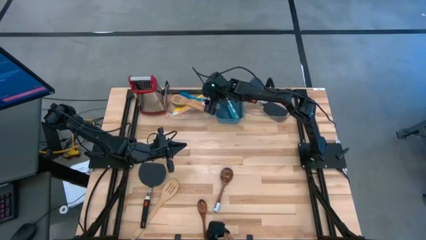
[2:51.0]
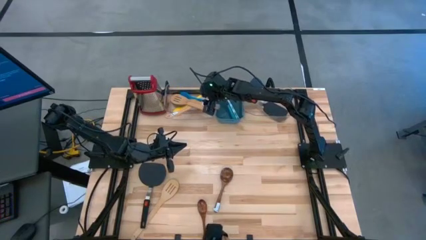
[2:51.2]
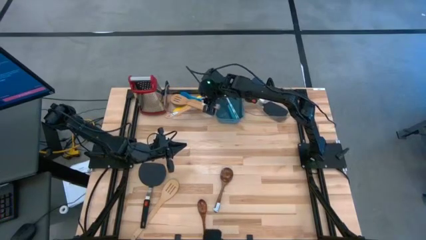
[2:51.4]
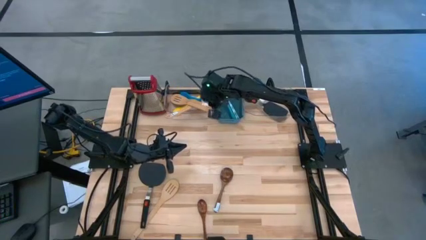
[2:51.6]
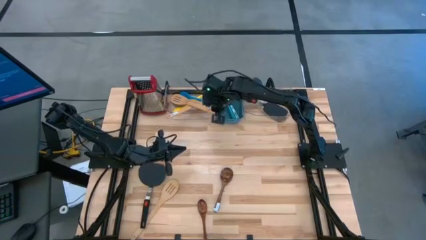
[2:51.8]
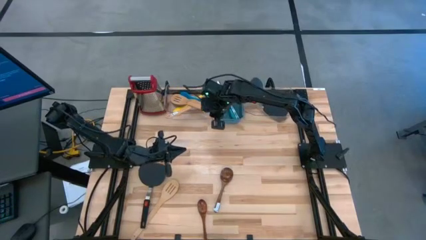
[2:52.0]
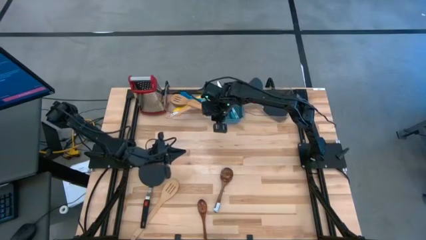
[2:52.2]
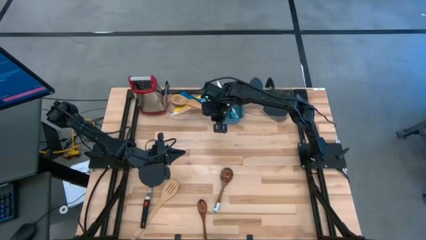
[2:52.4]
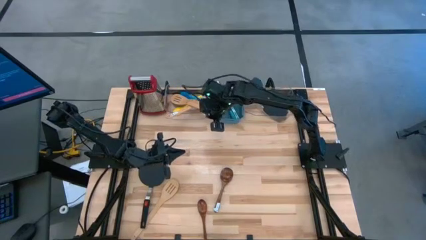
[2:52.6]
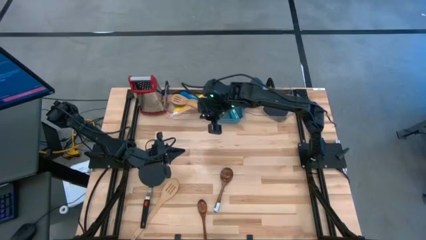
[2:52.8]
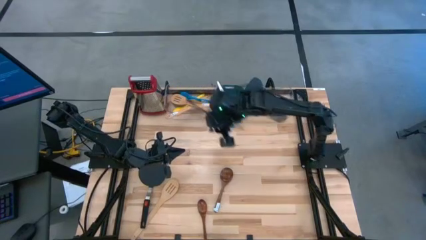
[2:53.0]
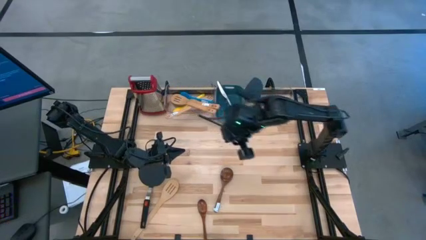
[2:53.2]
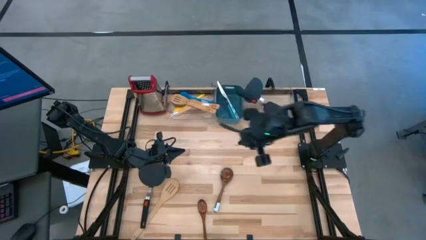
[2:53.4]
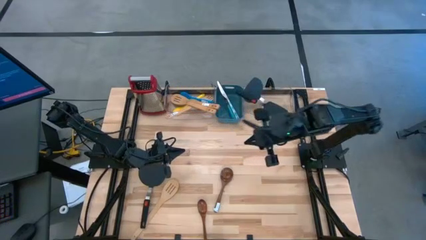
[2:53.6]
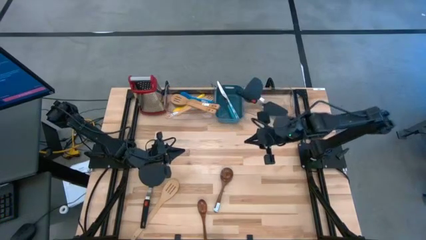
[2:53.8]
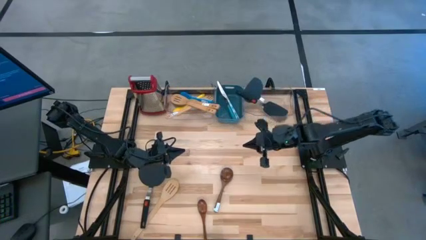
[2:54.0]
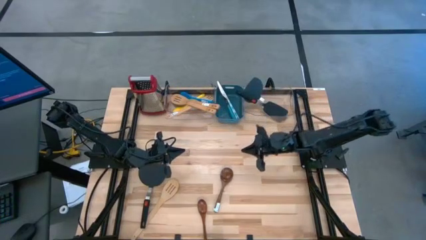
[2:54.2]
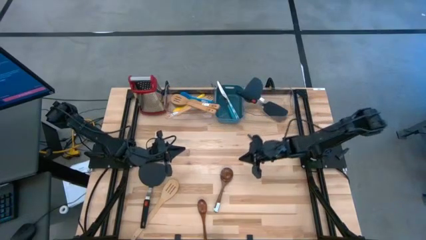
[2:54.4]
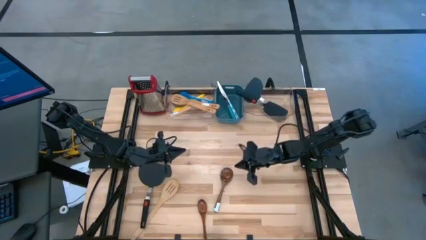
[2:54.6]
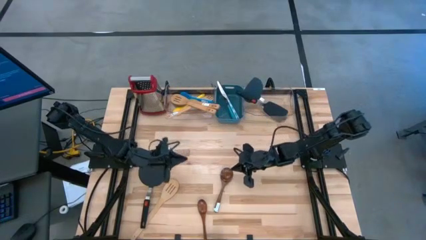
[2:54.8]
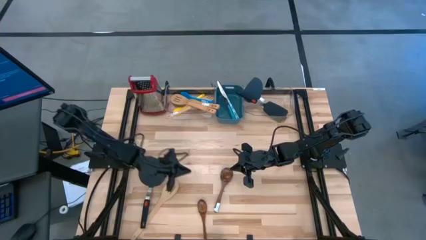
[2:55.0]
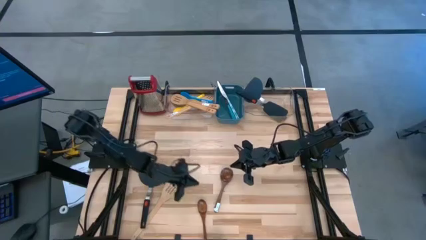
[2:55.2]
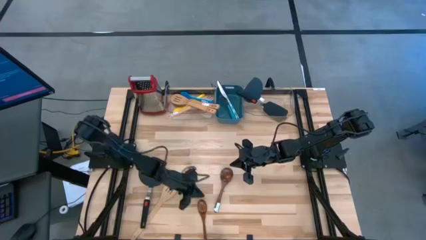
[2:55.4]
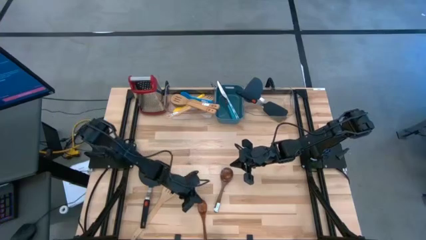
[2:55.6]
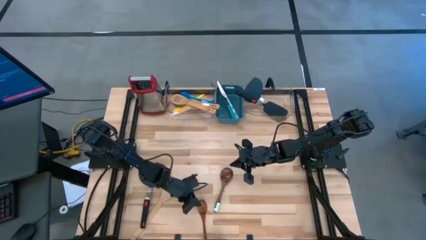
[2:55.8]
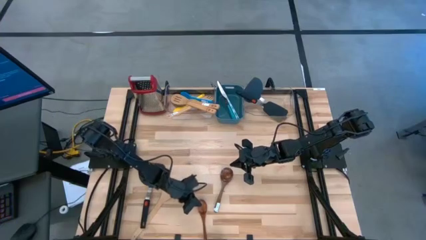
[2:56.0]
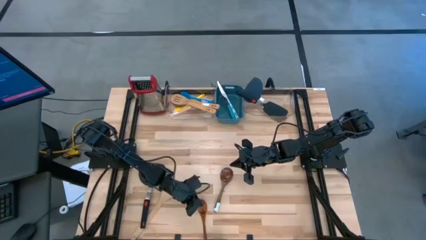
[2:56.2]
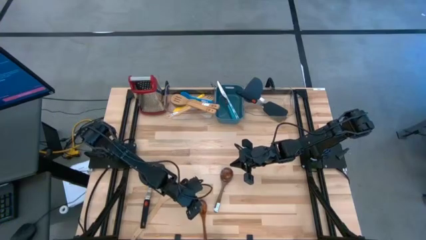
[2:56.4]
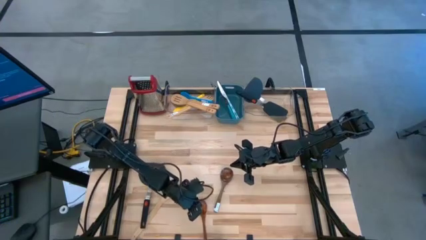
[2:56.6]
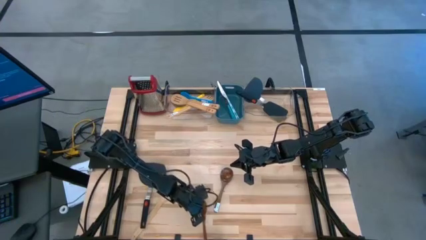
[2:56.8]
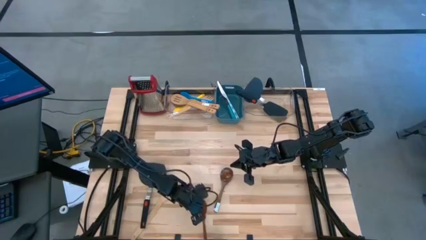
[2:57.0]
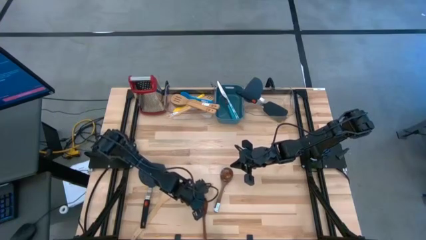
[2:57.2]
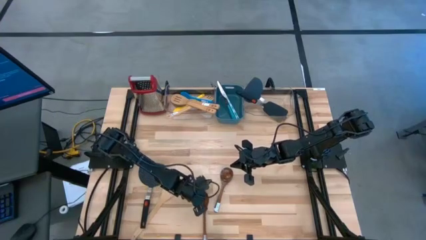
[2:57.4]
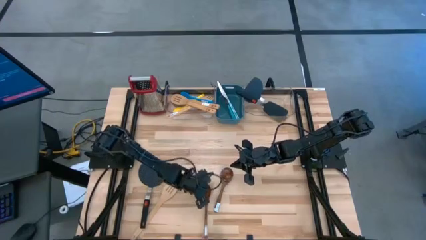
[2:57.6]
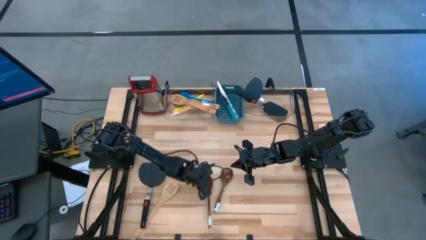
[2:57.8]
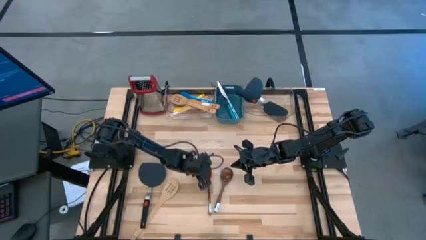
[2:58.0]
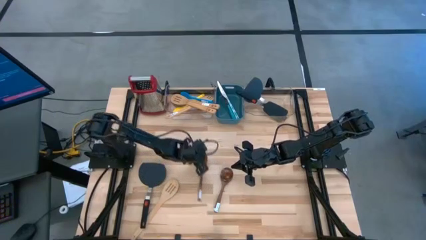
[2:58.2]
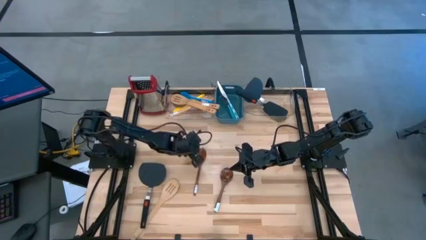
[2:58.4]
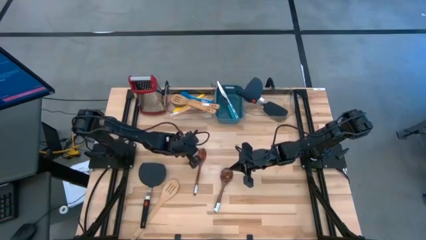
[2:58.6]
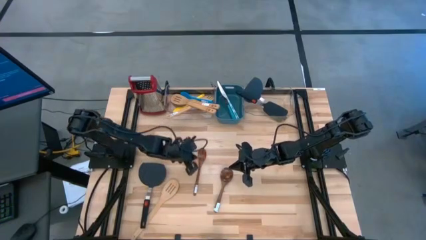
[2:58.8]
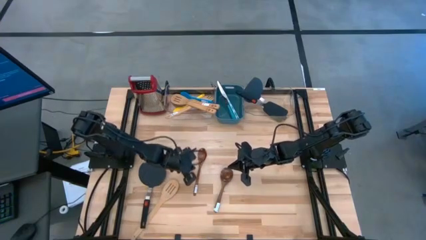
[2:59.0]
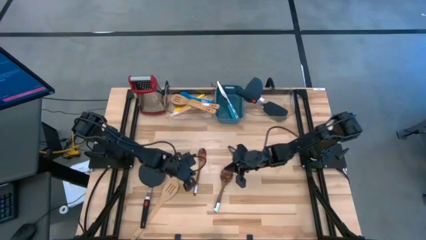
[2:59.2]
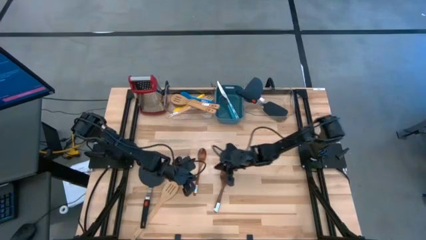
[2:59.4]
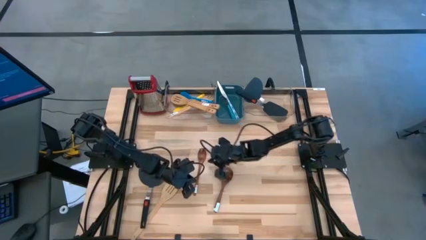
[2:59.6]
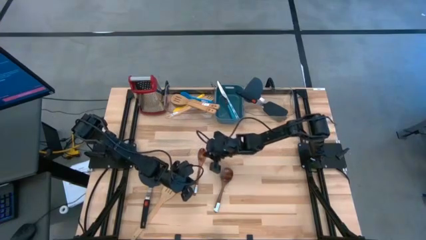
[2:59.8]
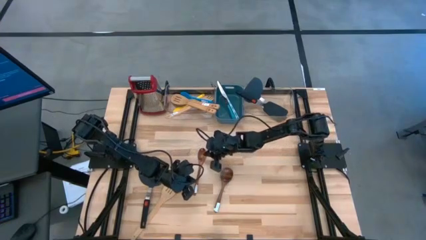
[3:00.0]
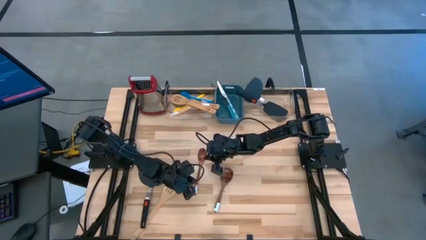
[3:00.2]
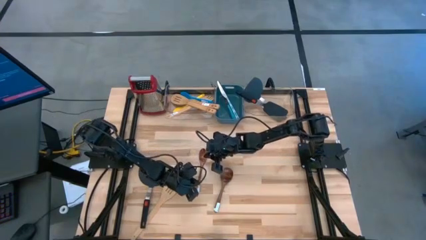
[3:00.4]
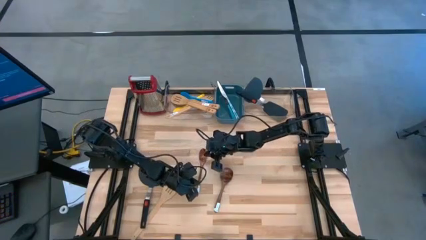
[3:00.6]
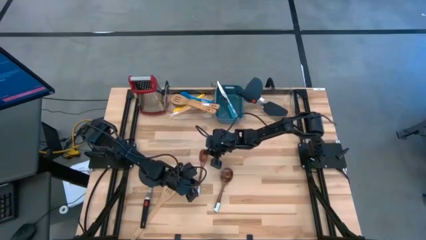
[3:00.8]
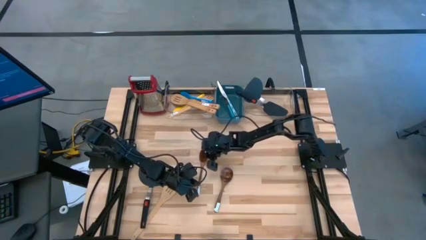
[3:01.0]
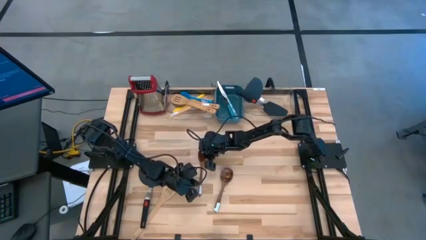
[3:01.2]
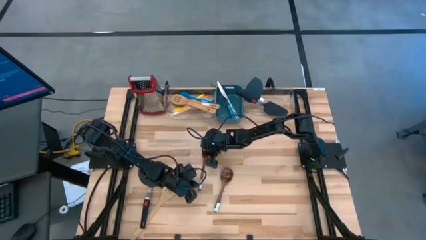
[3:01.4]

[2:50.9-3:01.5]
Task: Pick & Place Kitchen Items
Put the brown serving spoon into the left transparent bin

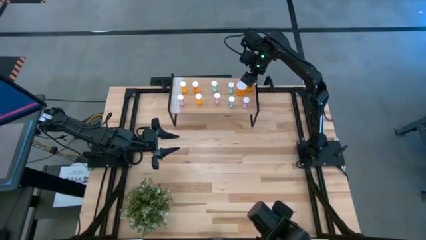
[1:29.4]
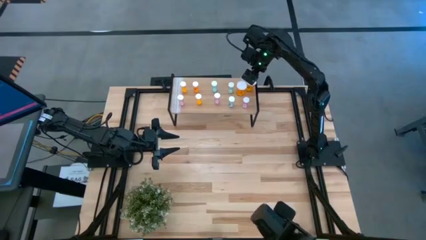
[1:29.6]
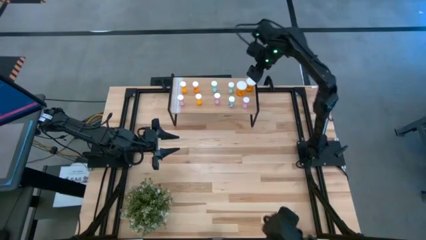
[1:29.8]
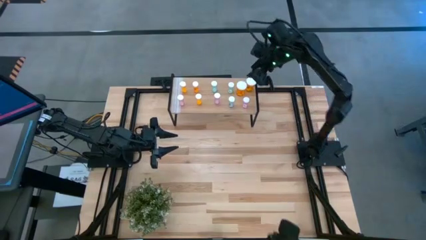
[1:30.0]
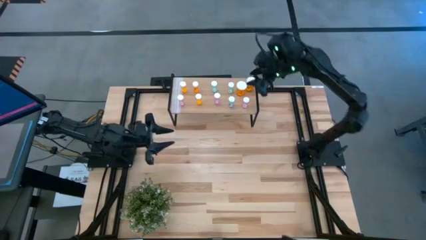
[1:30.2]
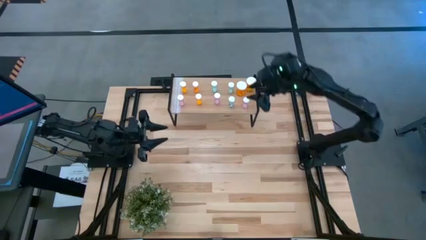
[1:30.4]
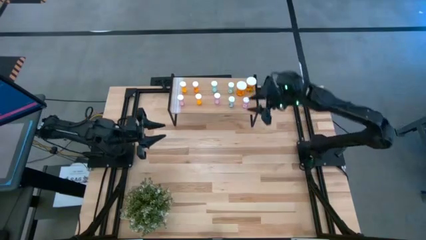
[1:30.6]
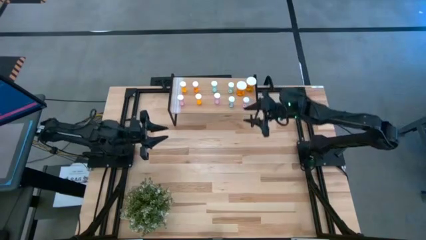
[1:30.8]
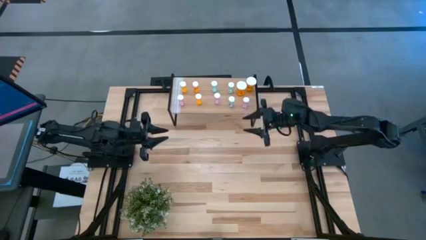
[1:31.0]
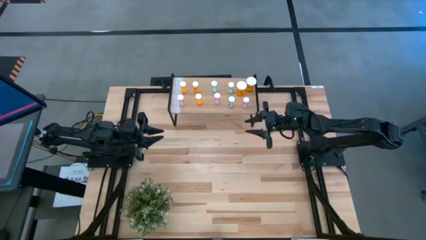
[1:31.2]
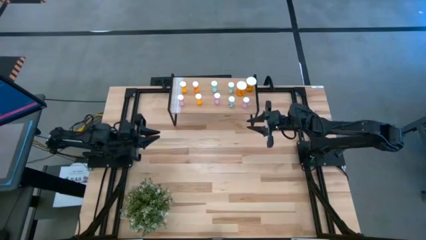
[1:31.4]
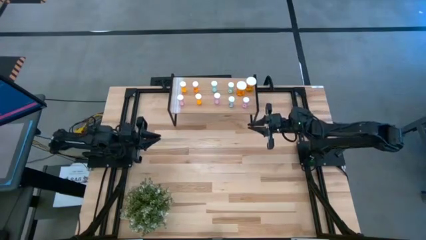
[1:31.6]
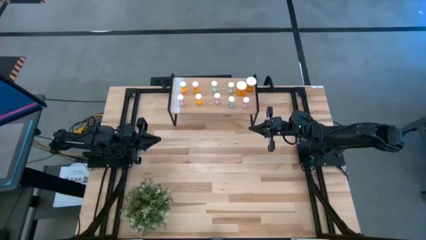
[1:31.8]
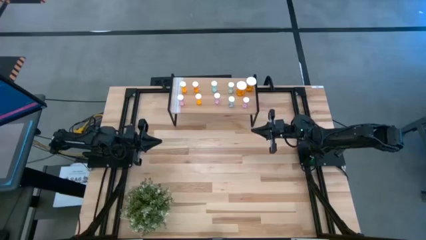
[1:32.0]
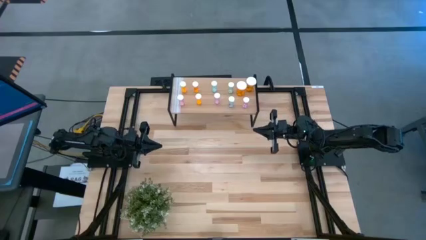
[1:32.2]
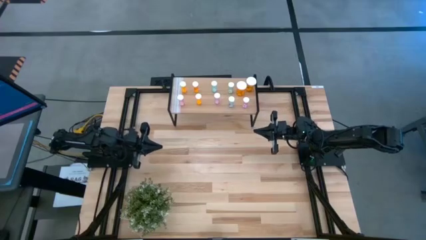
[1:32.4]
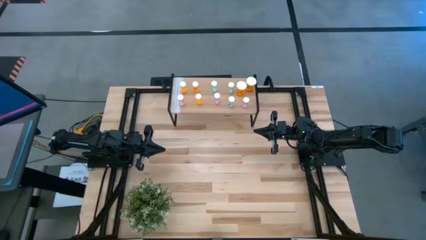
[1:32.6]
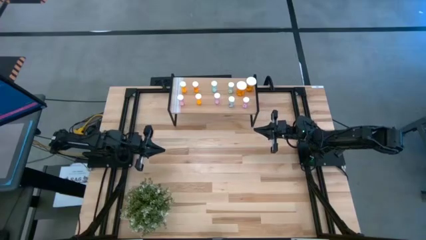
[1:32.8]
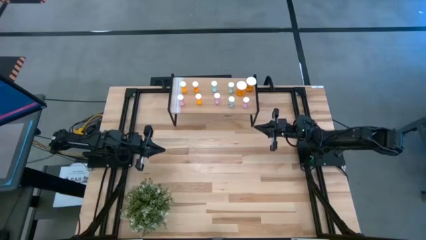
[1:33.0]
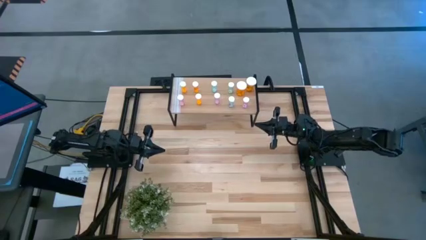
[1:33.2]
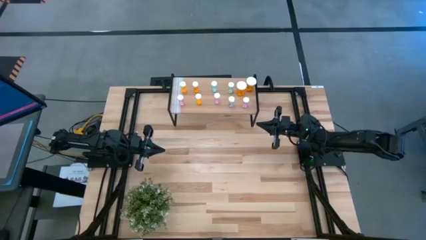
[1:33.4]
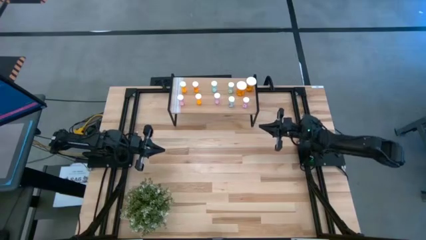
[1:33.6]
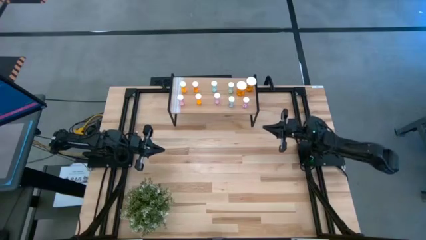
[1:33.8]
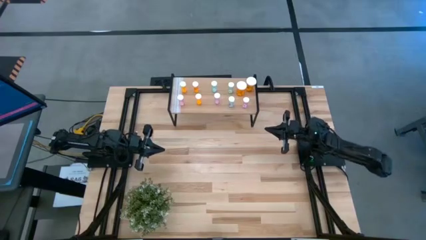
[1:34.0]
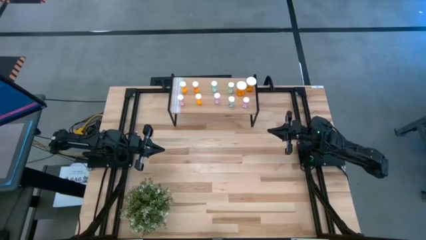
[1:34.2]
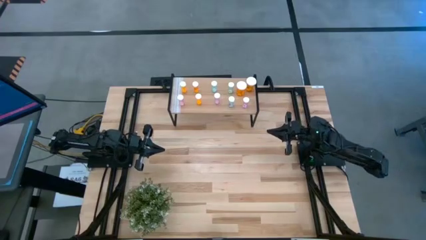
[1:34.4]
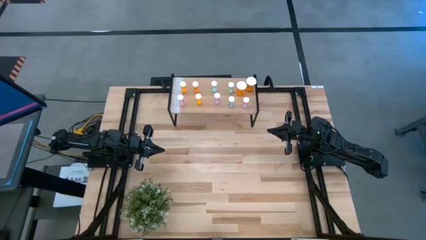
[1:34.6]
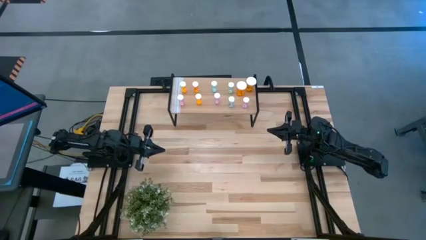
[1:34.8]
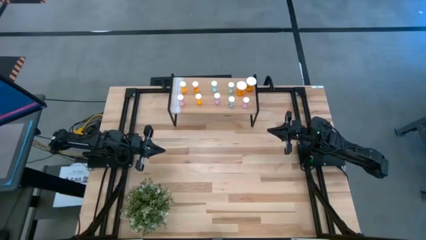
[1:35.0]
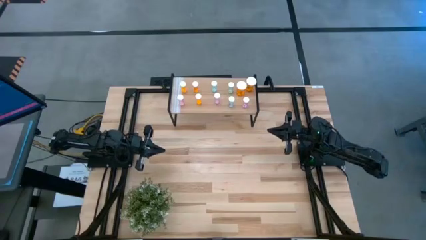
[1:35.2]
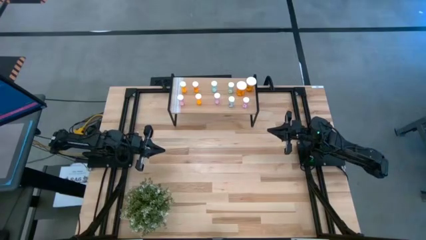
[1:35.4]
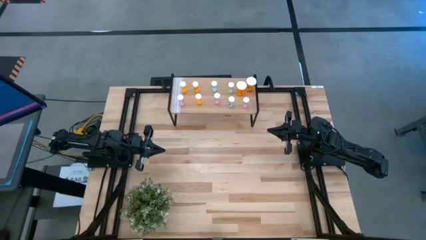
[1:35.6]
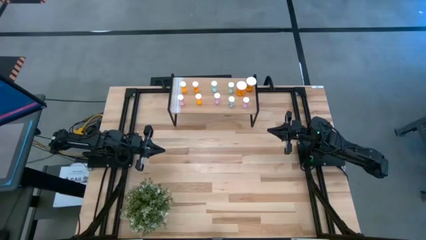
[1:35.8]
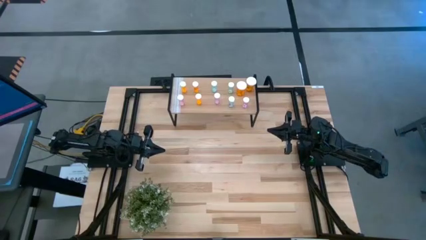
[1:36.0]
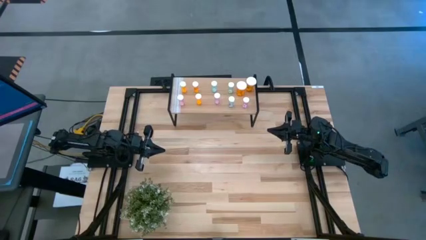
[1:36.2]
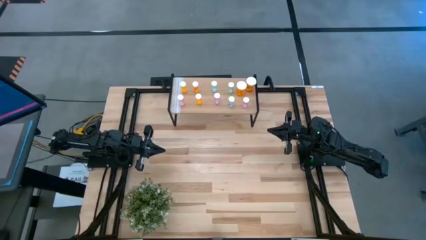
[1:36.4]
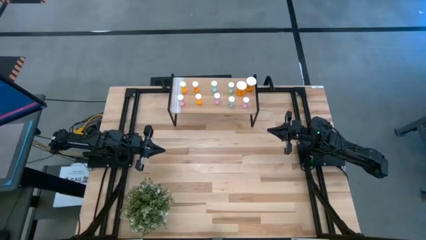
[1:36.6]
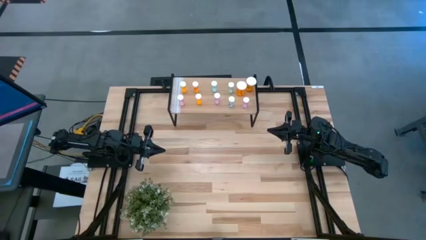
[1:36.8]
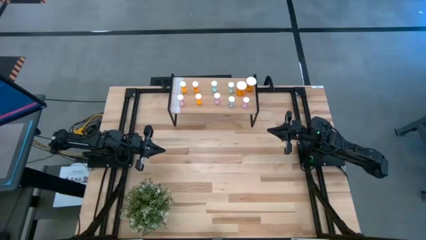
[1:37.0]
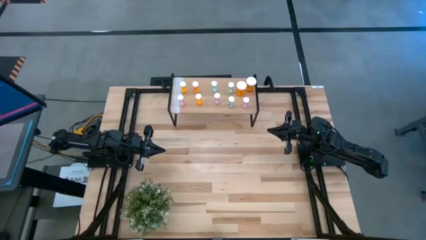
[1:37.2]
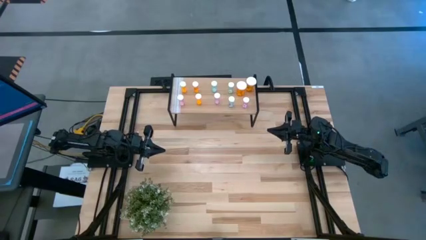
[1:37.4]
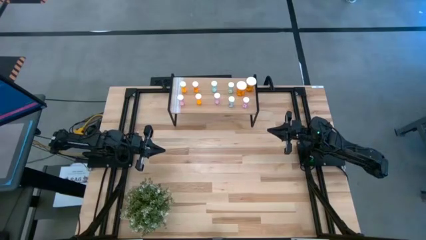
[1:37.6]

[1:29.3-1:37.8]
Task: Pick and place medicine bottles onto shelf by color
Return to Home Position
